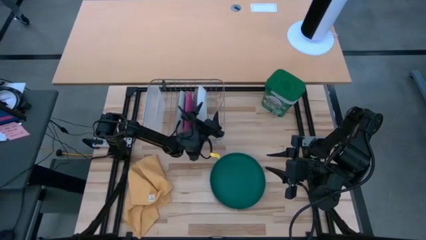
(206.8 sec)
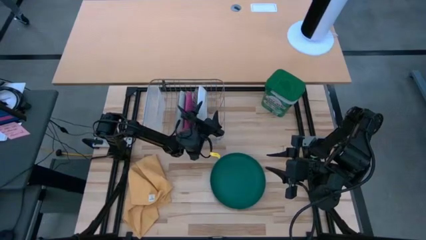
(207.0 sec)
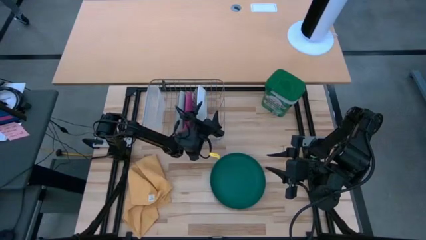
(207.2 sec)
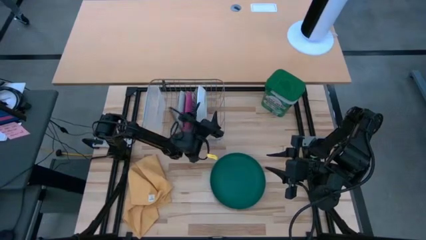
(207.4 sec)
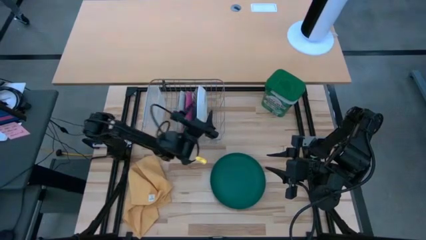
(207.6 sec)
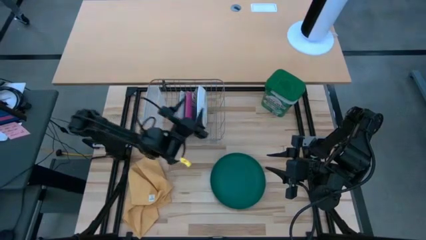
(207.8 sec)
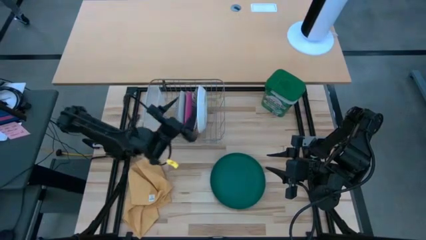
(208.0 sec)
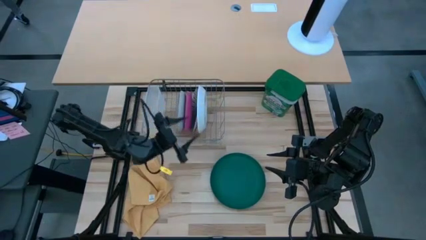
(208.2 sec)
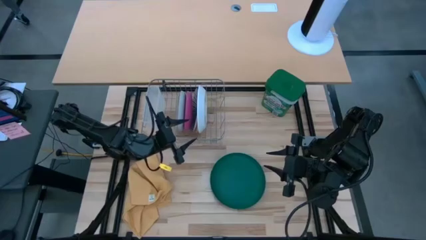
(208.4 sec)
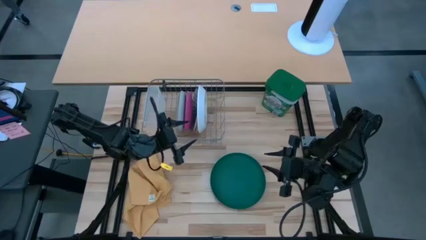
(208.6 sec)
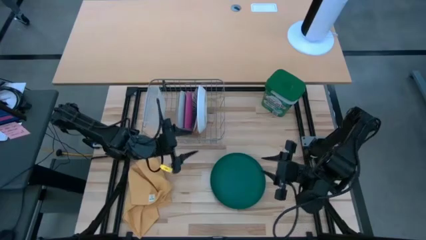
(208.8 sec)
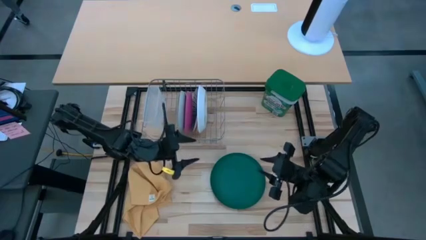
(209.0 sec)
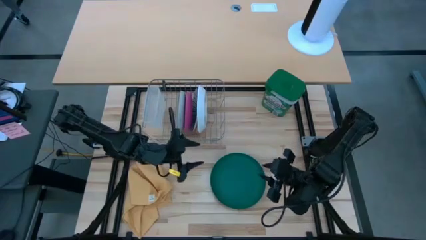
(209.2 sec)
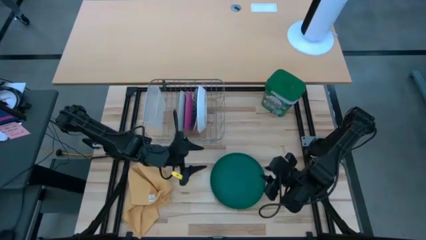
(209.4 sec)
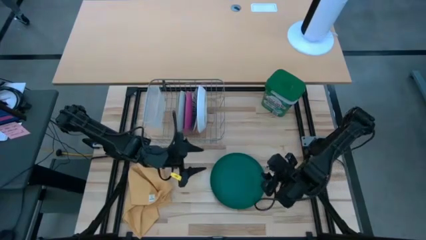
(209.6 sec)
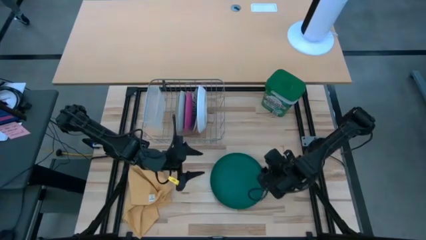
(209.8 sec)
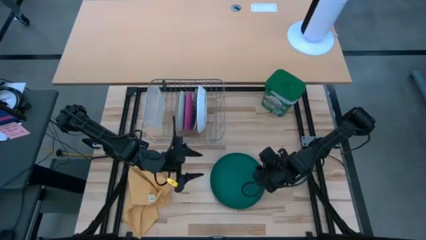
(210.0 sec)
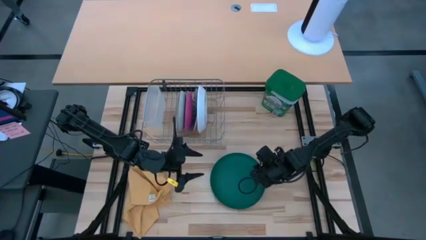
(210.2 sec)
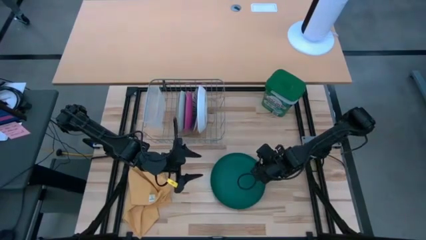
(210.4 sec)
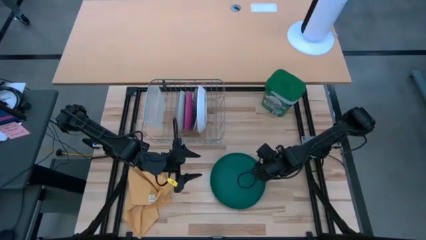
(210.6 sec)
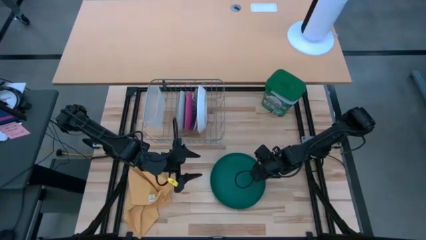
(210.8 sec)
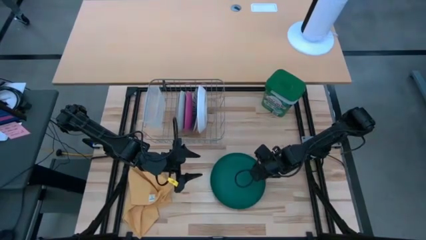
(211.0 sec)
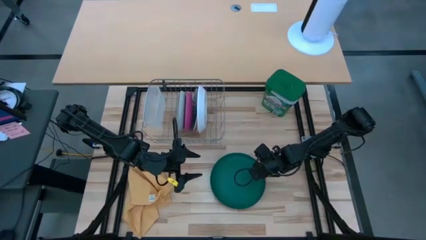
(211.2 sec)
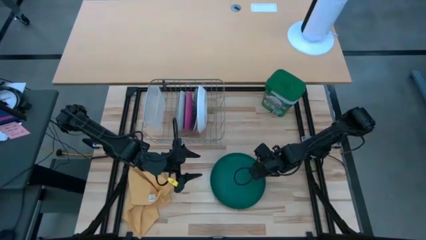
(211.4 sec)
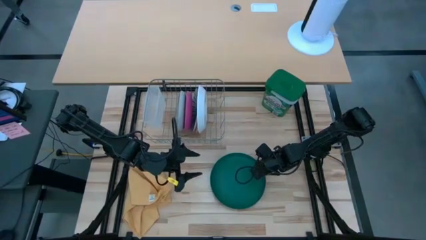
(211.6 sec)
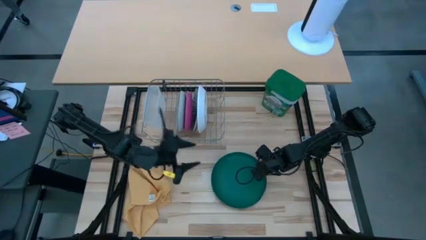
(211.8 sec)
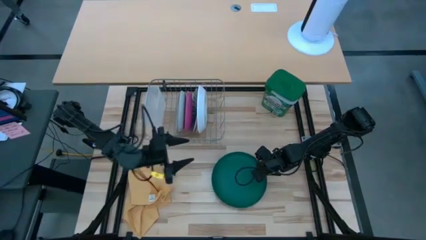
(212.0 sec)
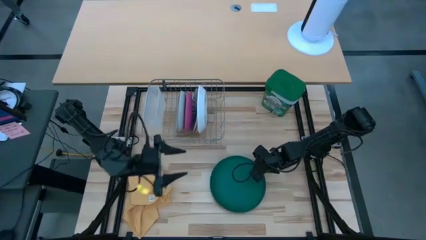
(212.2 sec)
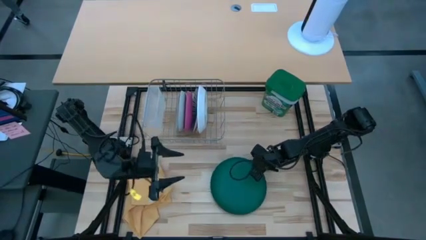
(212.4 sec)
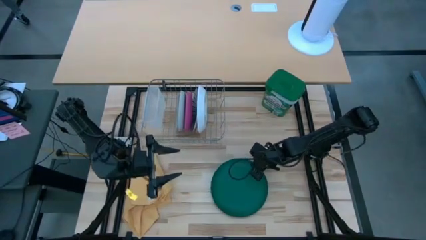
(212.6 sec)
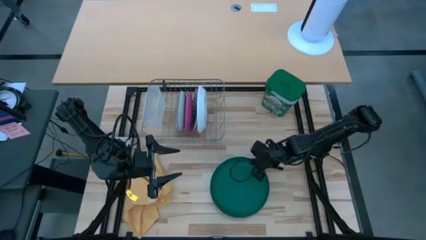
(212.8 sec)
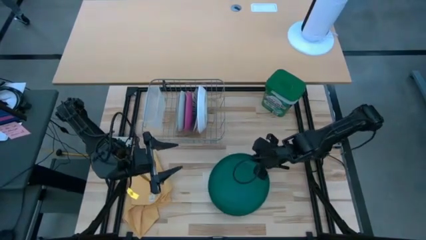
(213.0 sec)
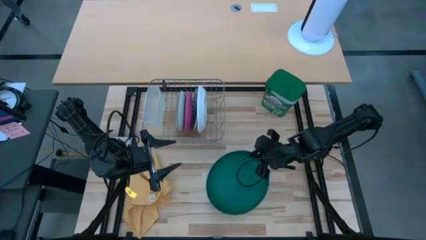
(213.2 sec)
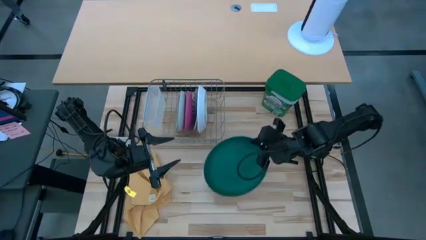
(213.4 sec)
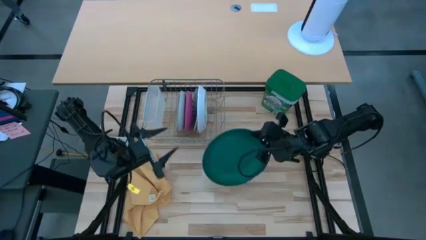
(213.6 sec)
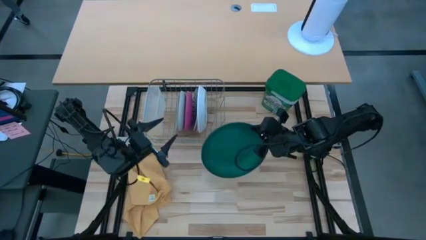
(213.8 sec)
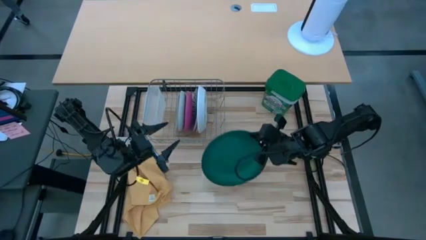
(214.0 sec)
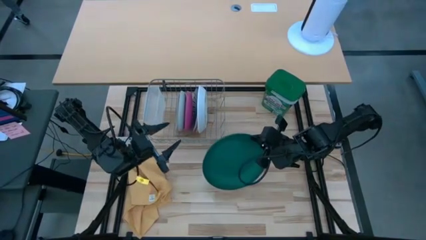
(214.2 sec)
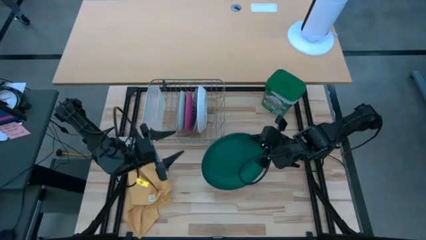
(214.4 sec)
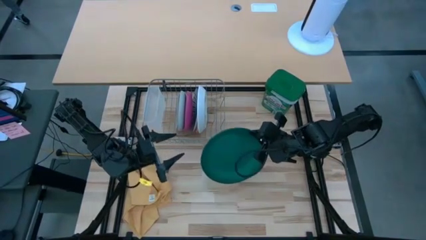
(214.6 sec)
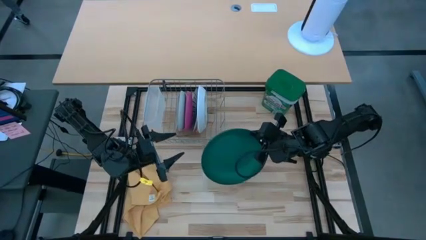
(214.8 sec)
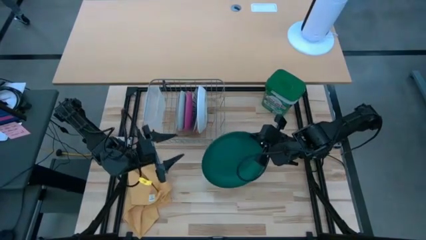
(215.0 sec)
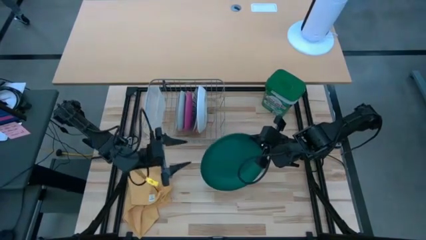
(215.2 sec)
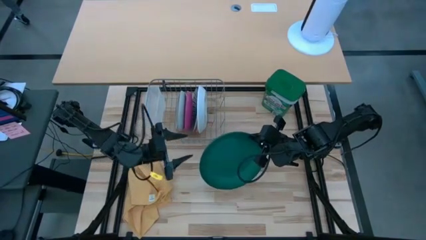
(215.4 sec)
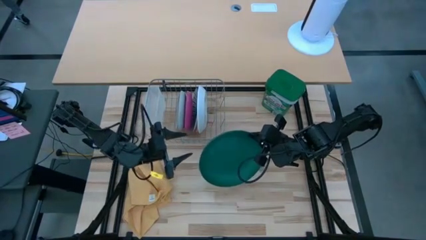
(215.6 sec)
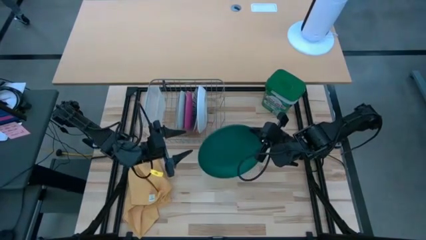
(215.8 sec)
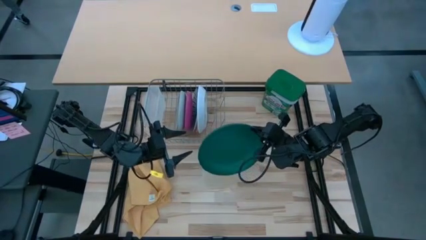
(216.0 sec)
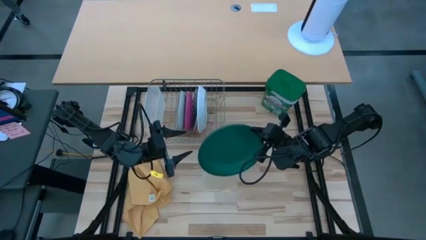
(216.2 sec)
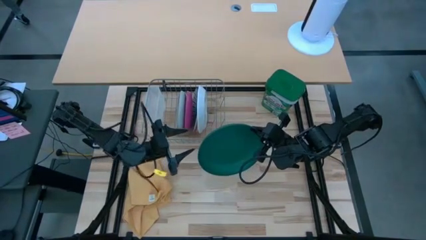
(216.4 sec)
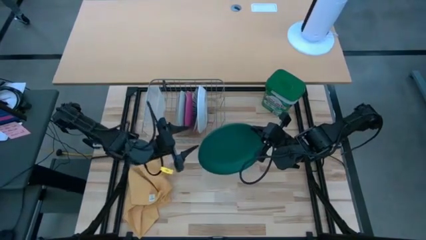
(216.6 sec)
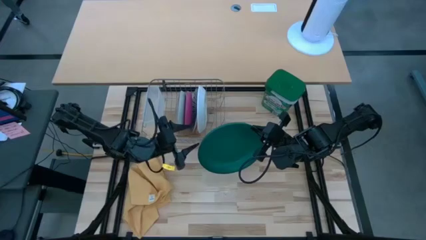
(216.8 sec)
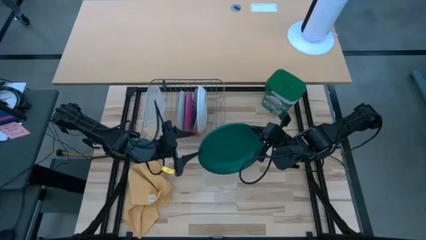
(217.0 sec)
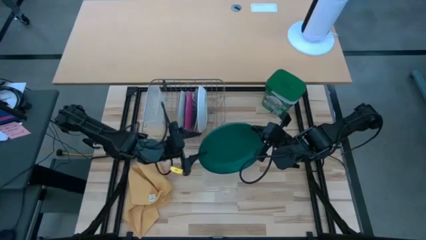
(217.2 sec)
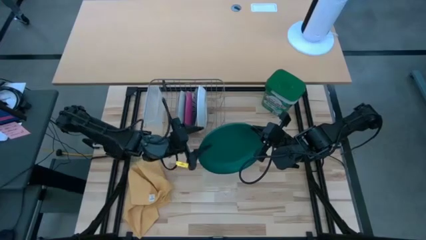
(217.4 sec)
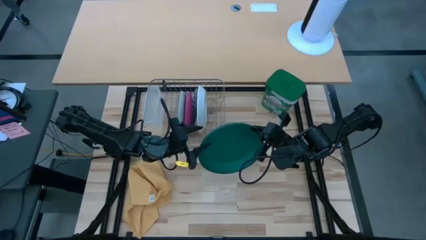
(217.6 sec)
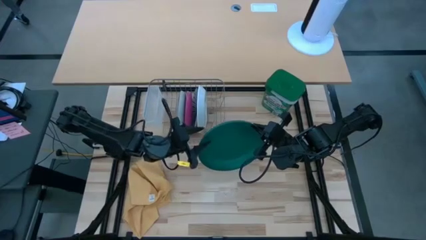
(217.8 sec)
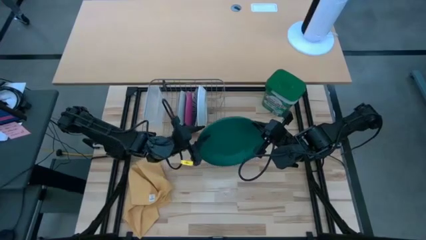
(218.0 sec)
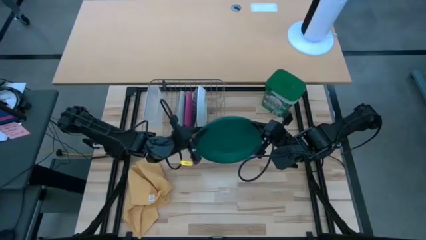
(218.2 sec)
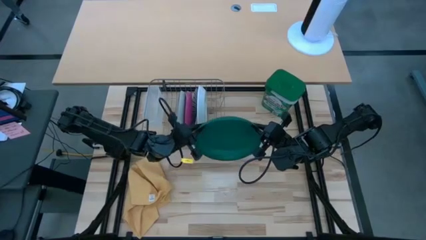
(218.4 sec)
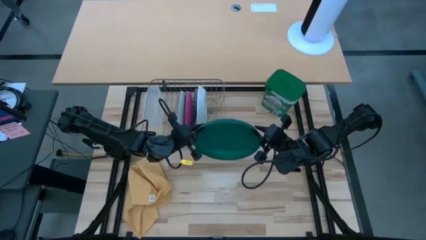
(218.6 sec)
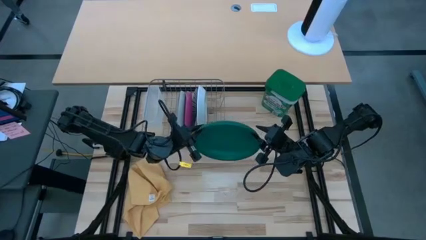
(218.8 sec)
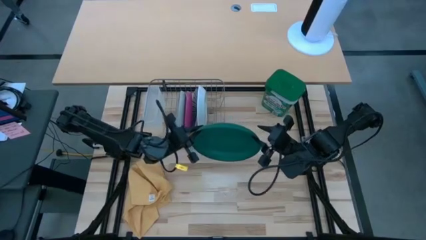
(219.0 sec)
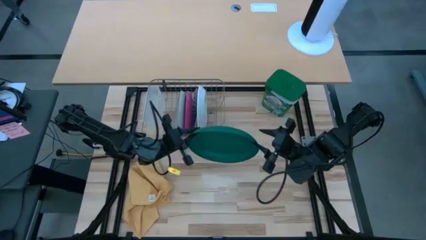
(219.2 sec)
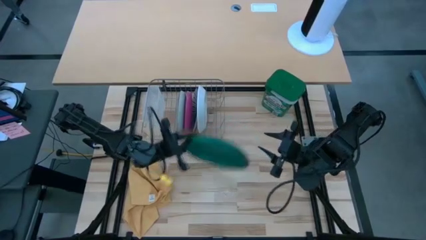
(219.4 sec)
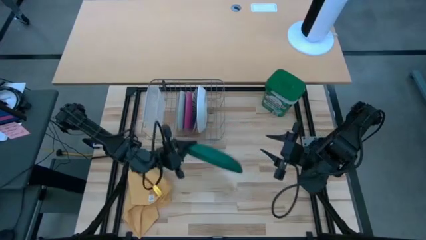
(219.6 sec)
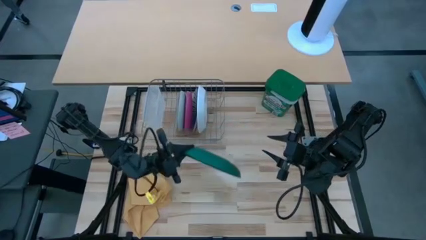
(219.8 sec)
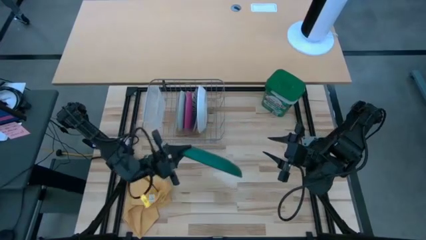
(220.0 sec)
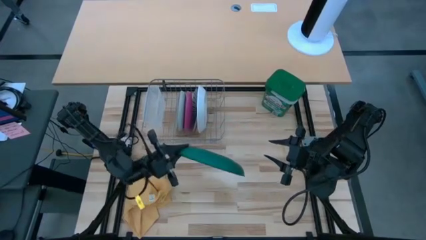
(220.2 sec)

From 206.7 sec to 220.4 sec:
Task: Sort dishes
Put the green plate into the dish rack

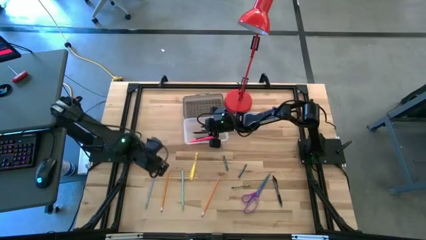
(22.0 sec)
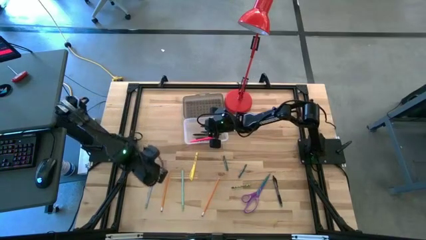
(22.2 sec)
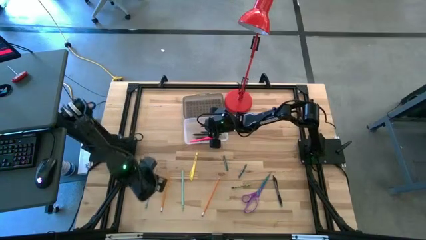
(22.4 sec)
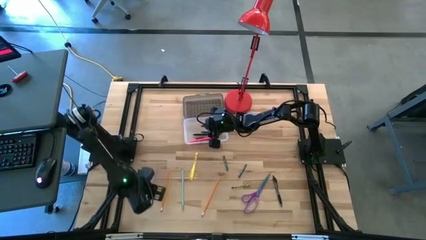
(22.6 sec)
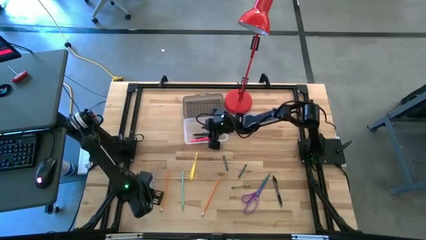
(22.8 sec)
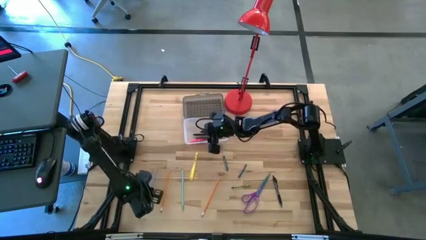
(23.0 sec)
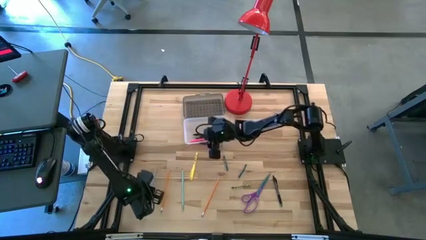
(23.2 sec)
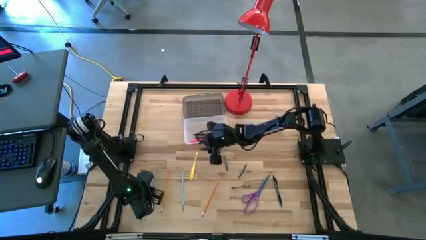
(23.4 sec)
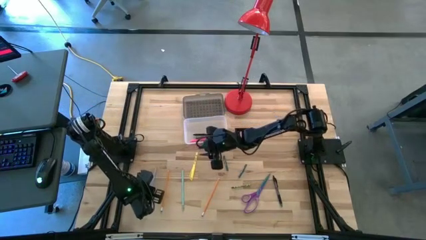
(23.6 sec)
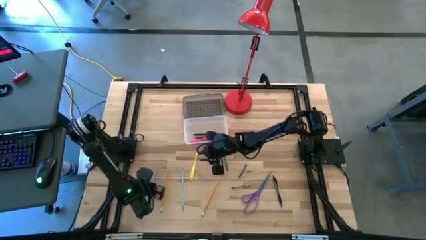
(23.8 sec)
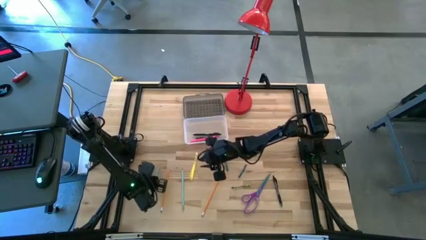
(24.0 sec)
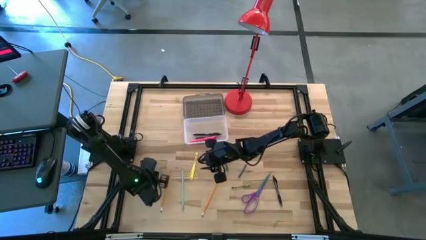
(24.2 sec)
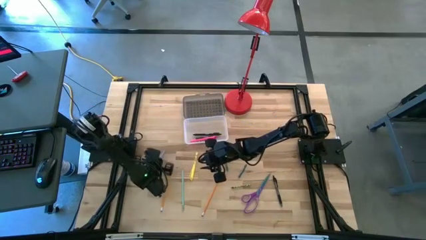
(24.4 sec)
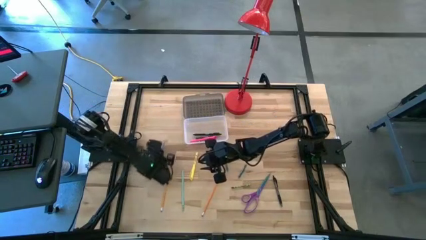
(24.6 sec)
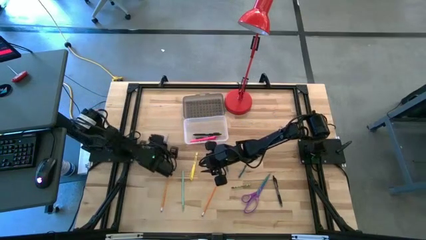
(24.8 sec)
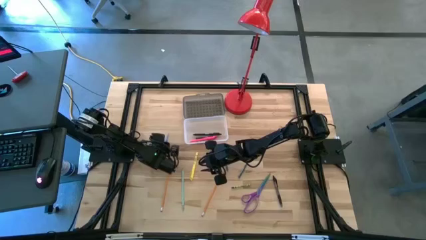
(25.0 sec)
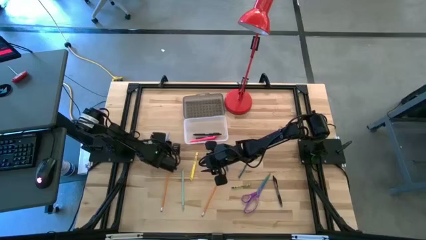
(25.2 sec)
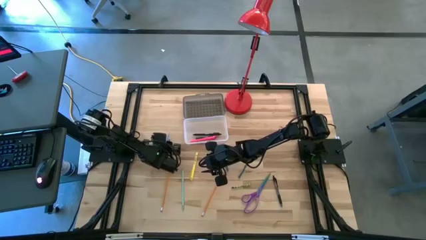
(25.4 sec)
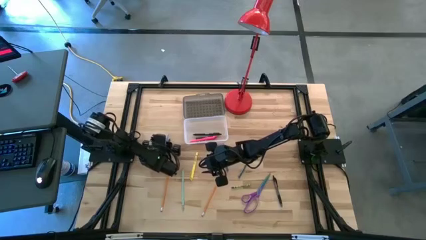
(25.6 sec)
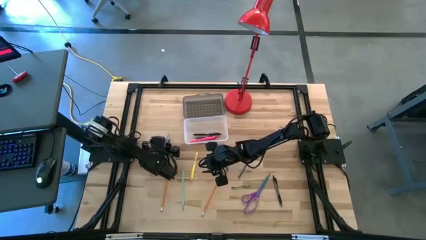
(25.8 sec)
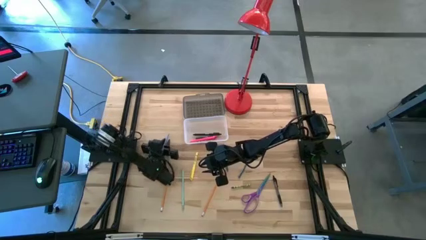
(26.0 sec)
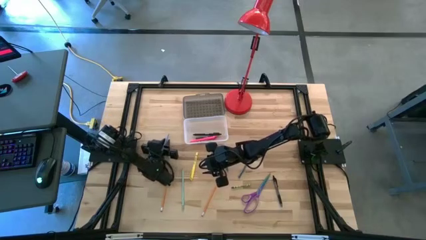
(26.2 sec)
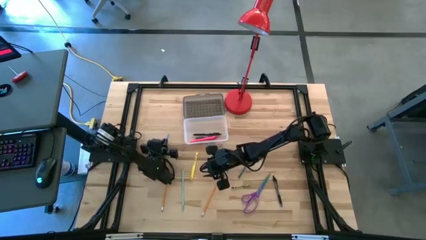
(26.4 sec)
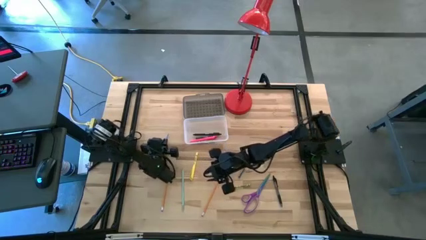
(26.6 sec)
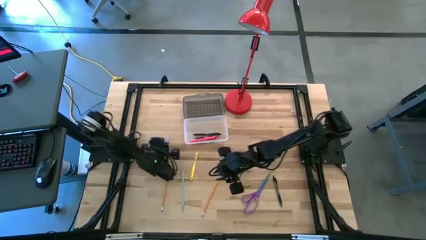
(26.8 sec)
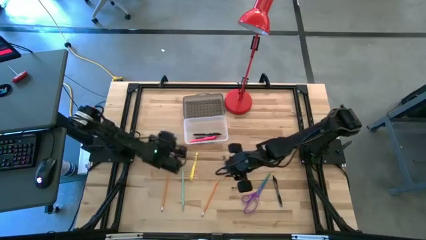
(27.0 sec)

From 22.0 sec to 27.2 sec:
Task: Pick & place school supplies into a supply box
Put the blue pencil into the black supply box
